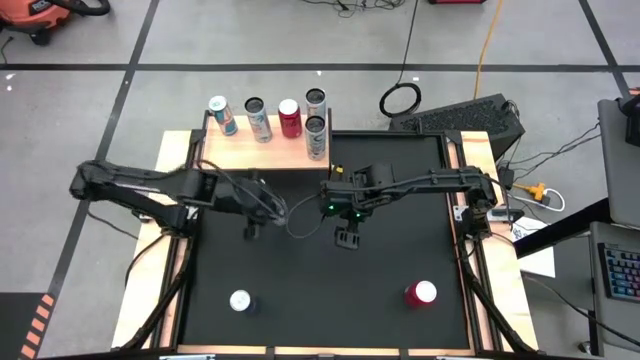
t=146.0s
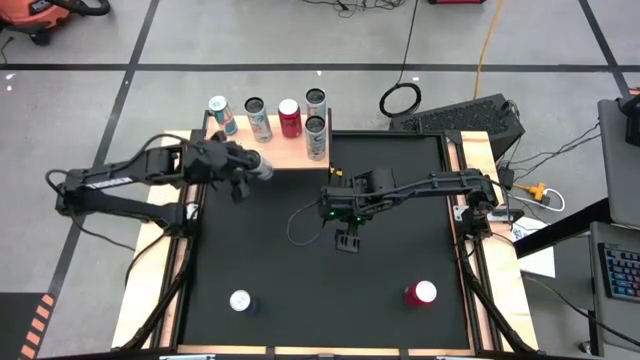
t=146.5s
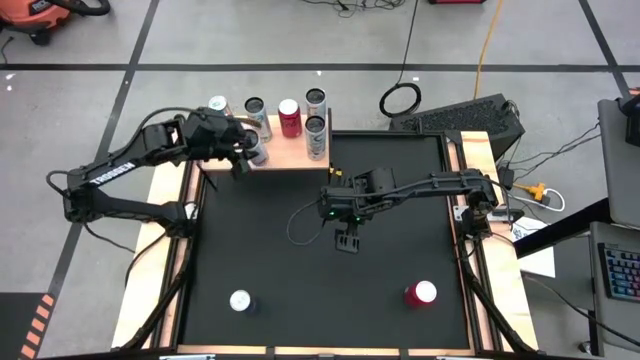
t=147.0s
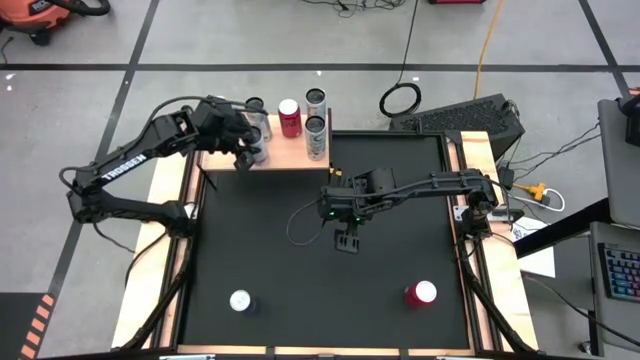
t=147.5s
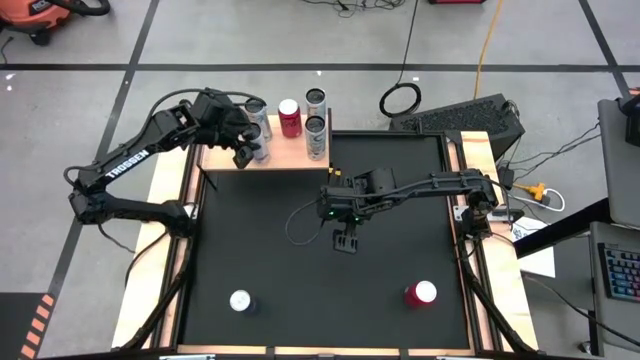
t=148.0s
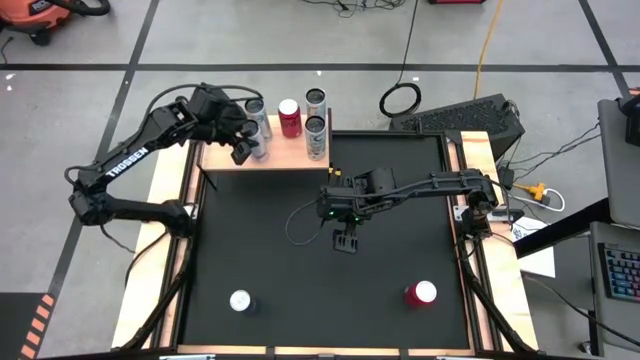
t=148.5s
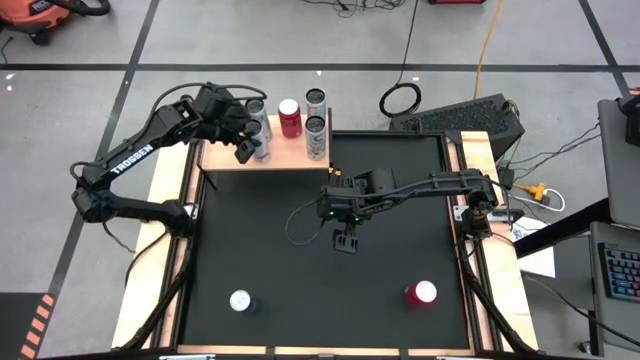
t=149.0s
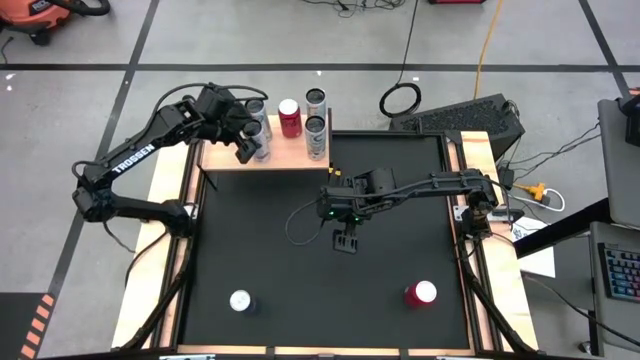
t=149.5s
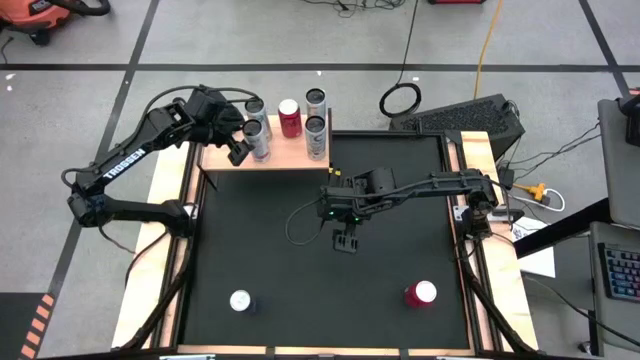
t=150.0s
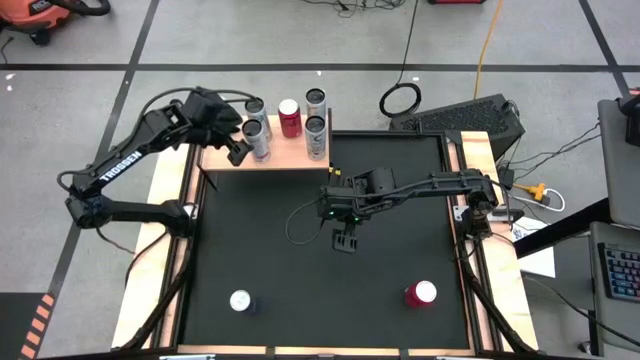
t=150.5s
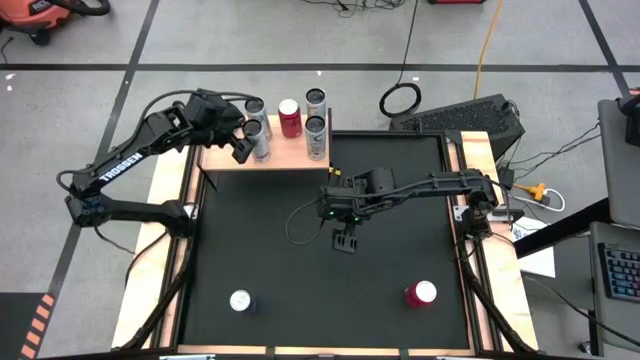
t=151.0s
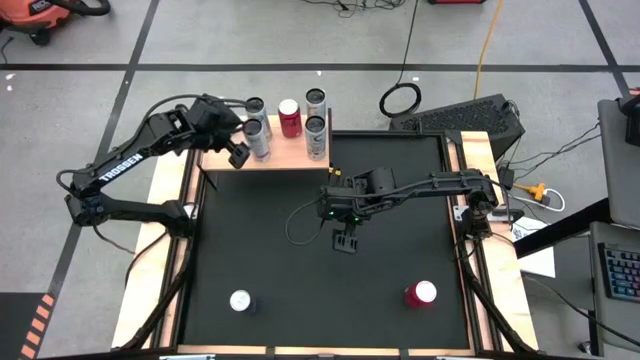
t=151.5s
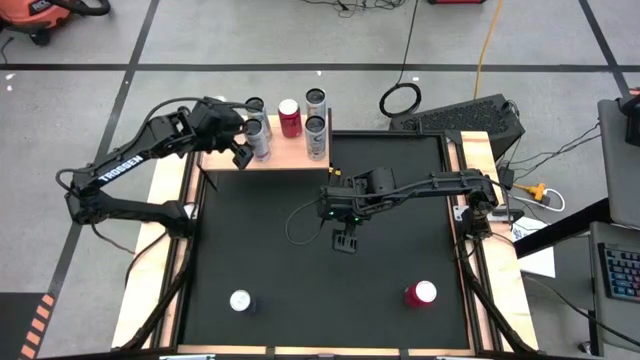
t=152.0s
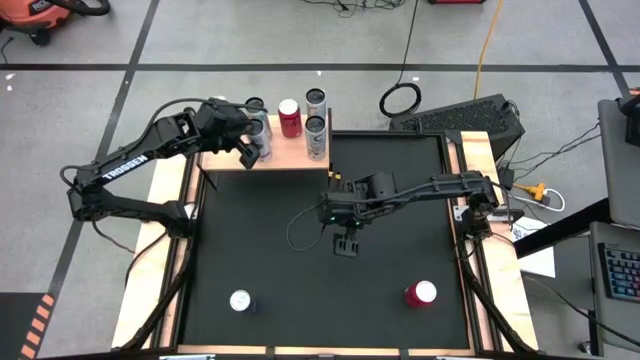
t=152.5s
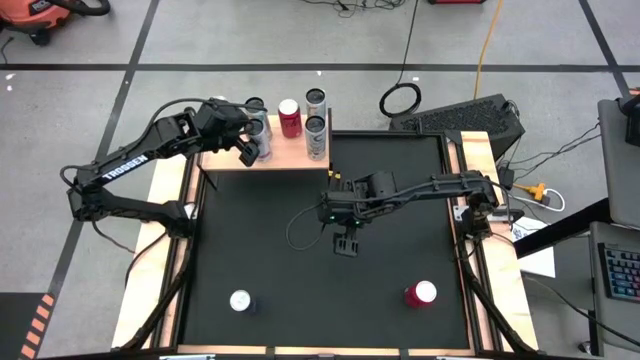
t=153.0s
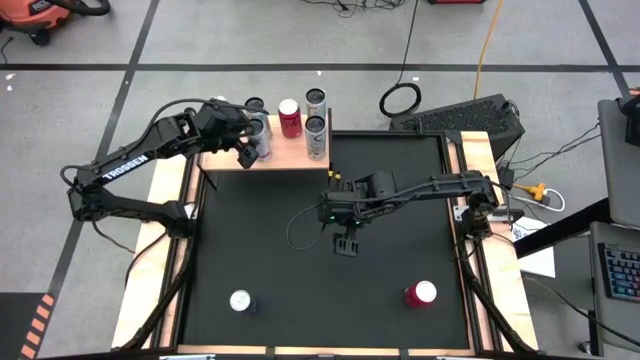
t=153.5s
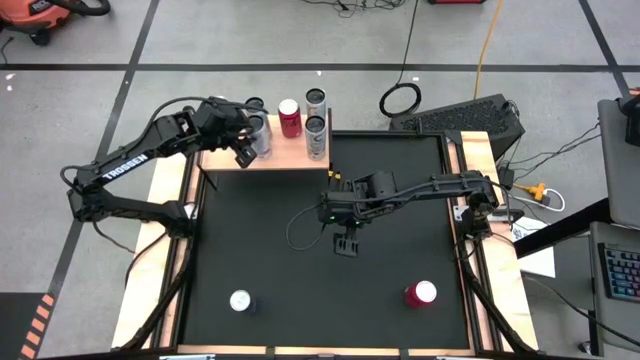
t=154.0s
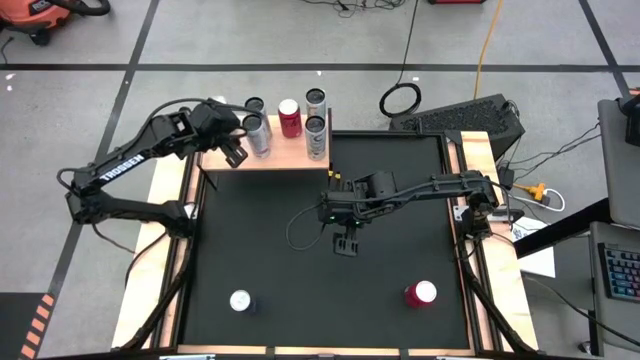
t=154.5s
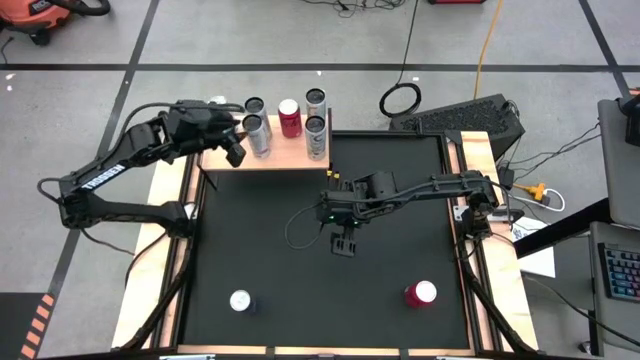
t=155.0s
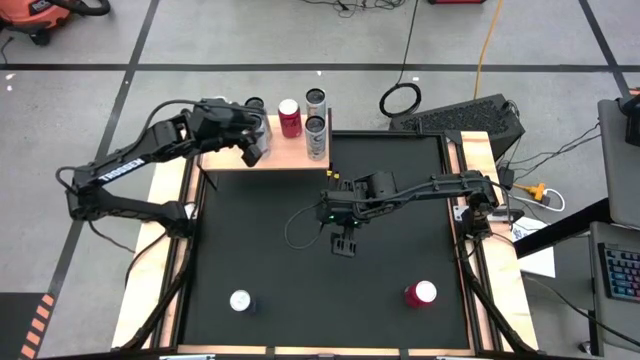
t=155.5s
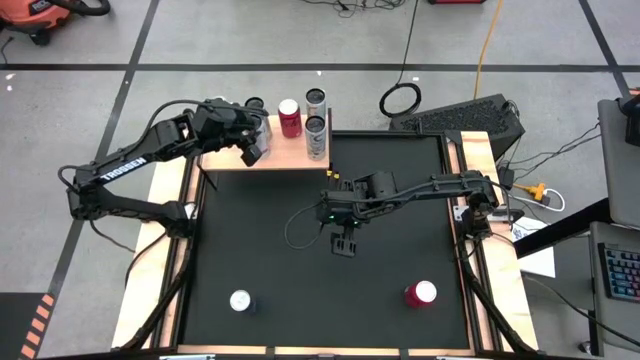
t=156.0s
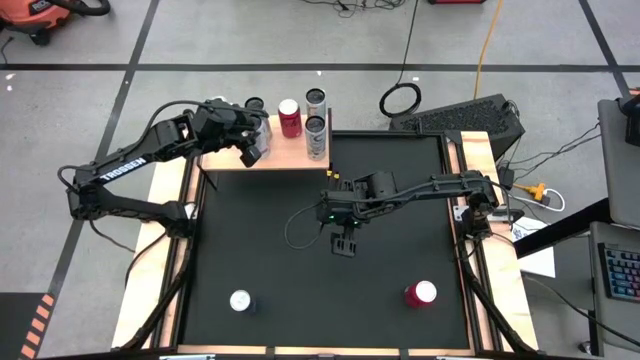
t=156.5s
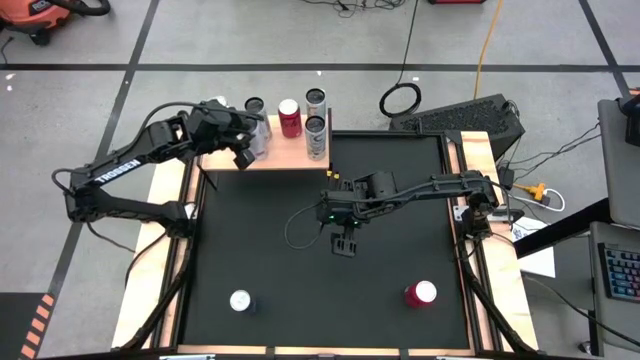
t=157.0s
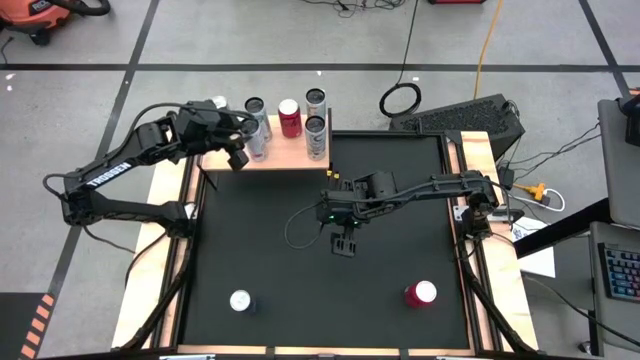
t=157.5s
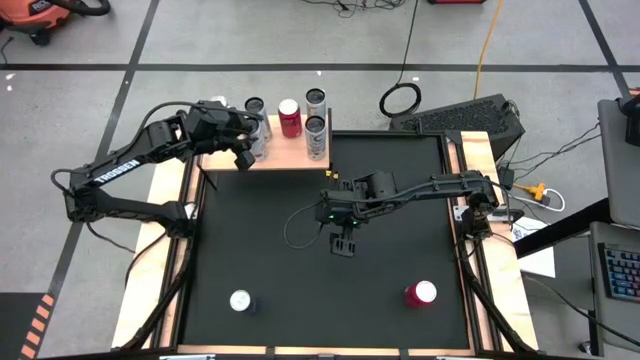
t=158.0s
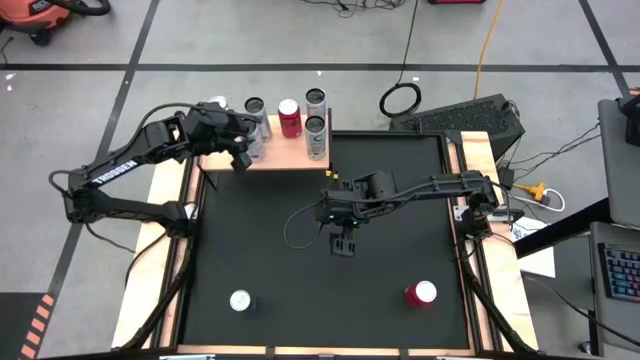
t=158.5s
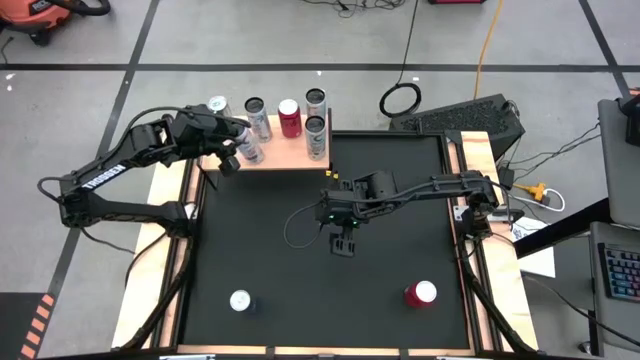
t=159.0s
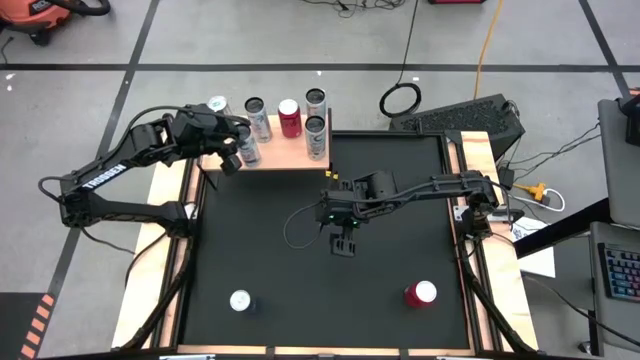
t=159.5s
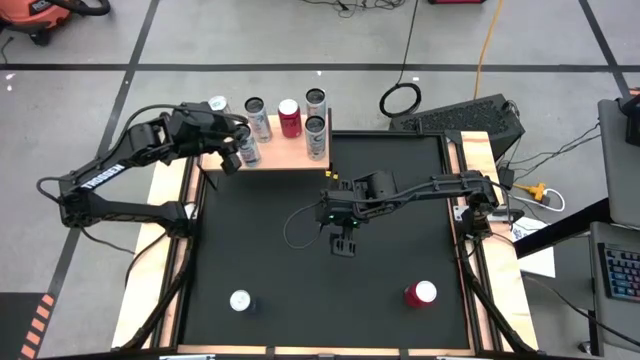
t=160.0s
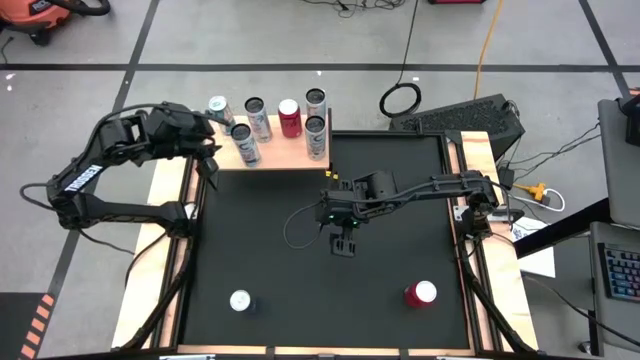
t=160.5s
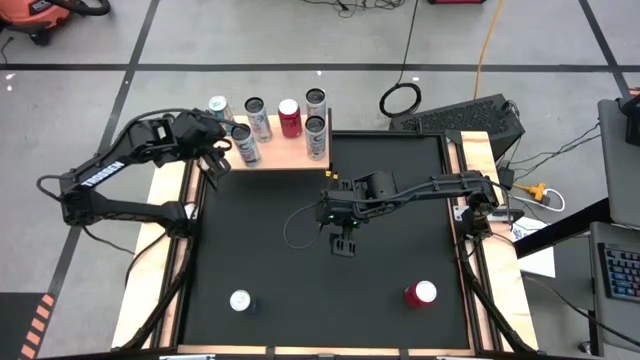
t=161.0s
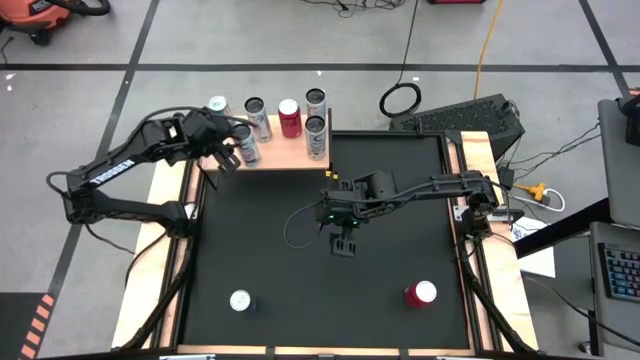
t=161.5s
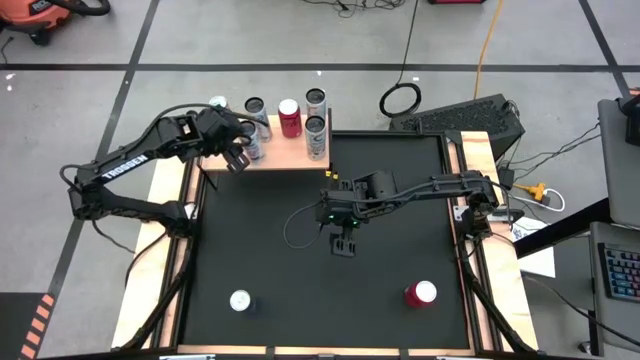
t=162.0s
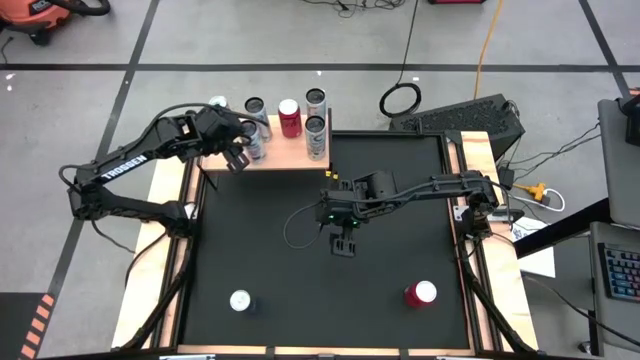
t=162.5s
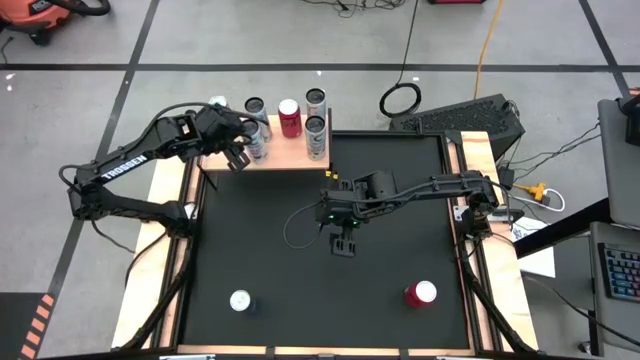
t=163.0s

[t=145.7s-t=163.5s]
Task: Place canned beverage on shelf
Put the white pink soda can on the shelf aligned with the other white pink soda can
